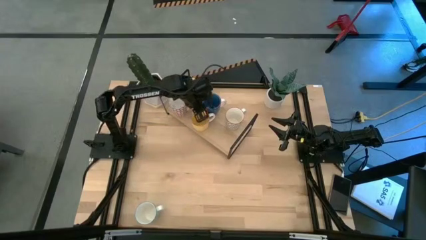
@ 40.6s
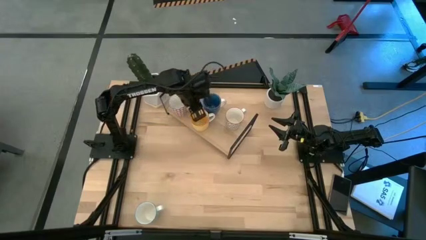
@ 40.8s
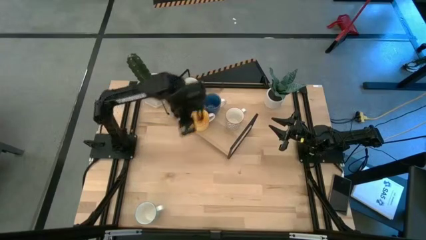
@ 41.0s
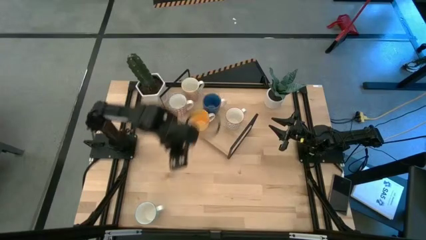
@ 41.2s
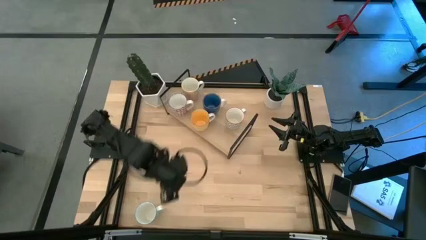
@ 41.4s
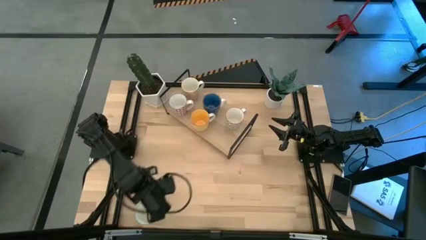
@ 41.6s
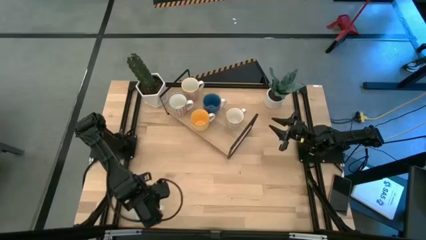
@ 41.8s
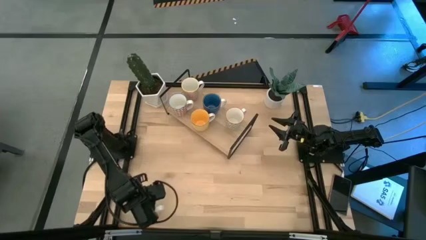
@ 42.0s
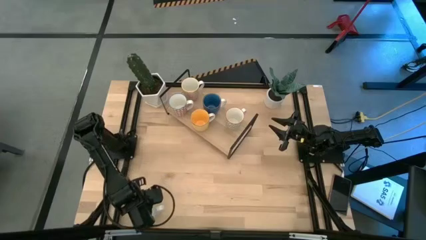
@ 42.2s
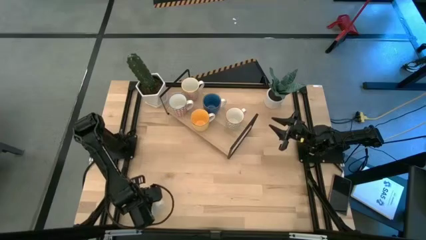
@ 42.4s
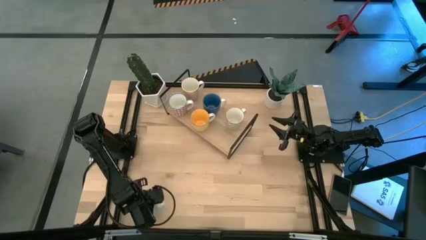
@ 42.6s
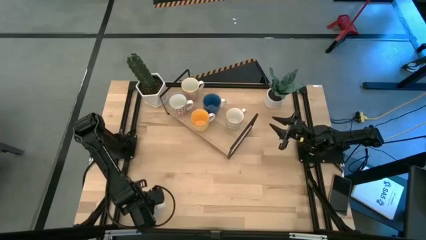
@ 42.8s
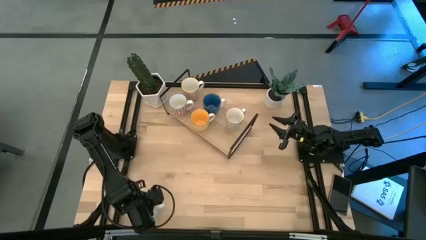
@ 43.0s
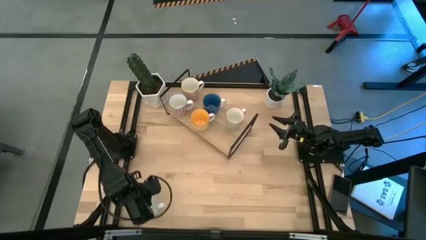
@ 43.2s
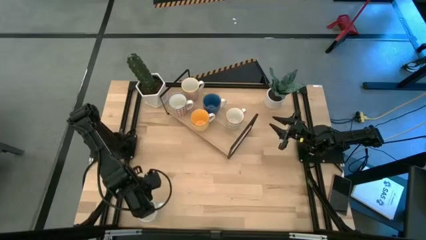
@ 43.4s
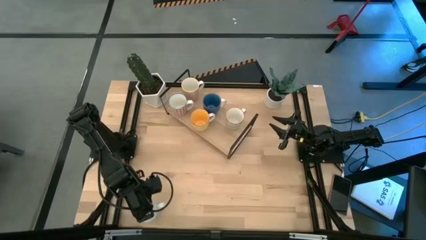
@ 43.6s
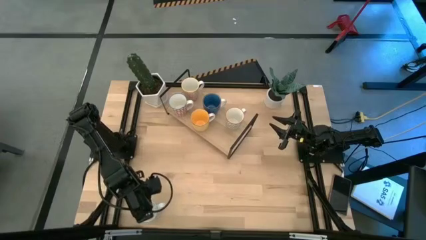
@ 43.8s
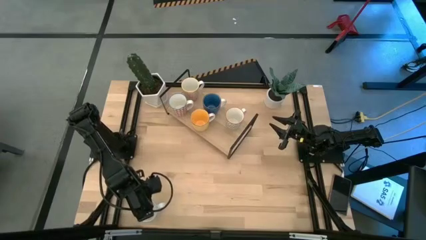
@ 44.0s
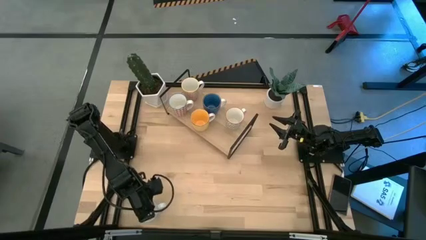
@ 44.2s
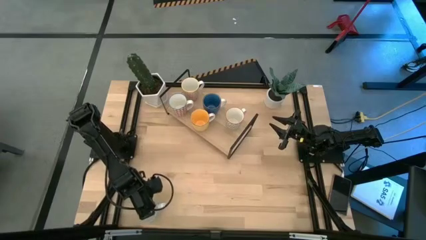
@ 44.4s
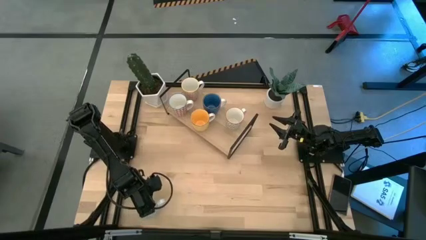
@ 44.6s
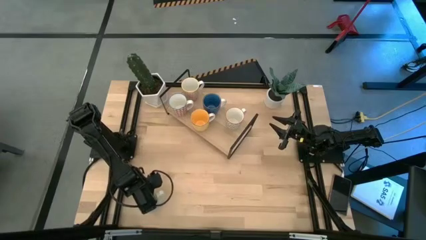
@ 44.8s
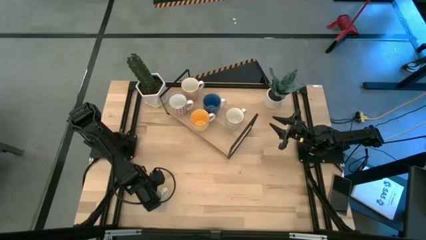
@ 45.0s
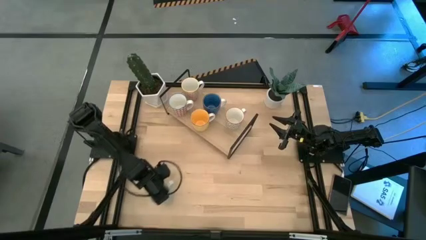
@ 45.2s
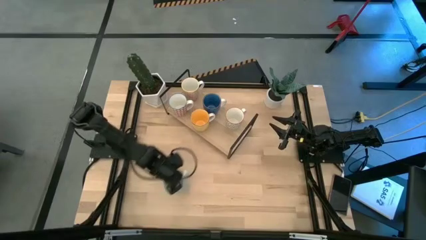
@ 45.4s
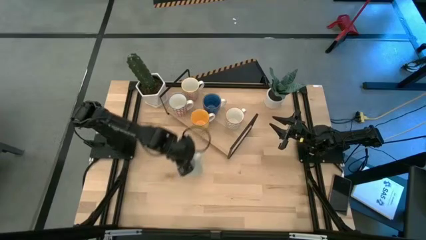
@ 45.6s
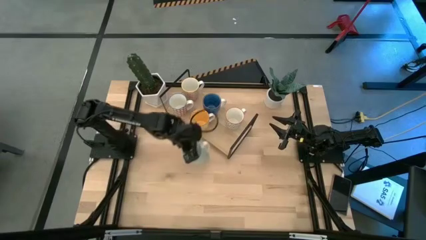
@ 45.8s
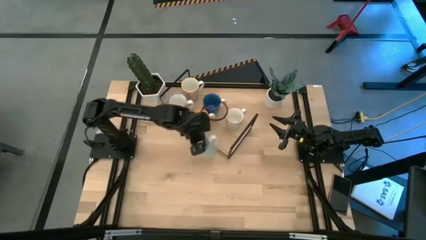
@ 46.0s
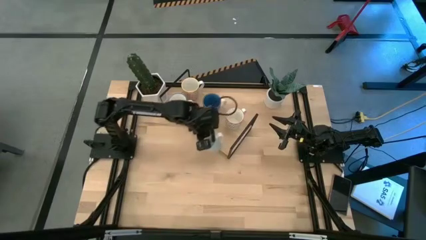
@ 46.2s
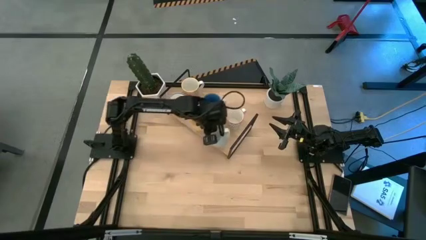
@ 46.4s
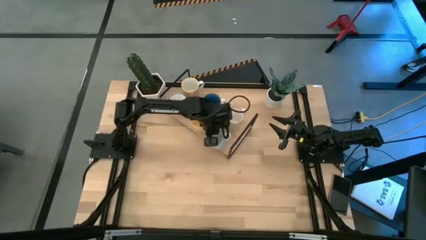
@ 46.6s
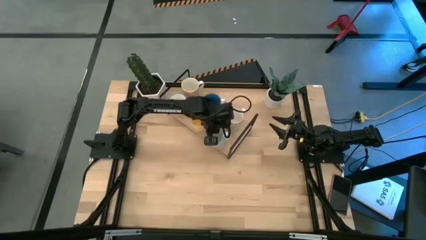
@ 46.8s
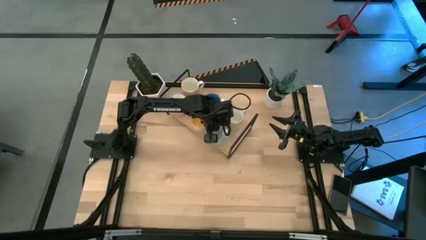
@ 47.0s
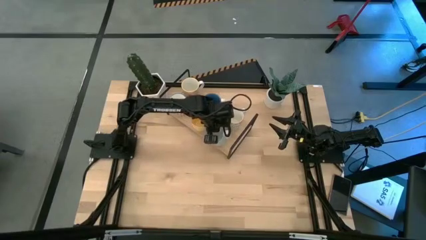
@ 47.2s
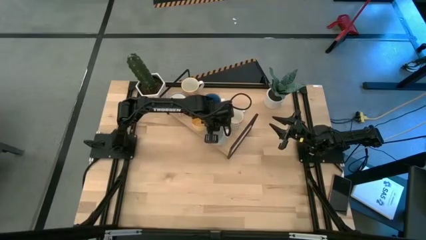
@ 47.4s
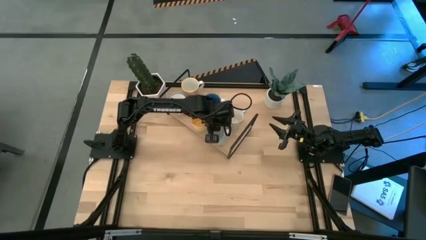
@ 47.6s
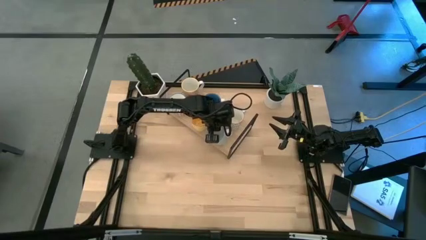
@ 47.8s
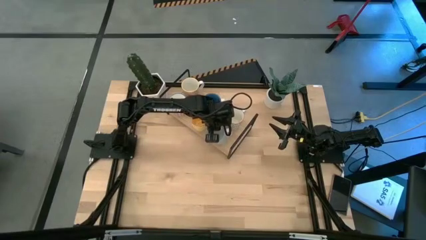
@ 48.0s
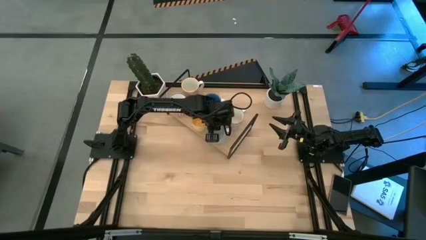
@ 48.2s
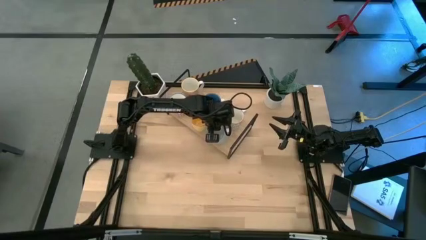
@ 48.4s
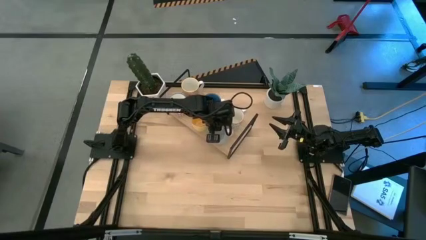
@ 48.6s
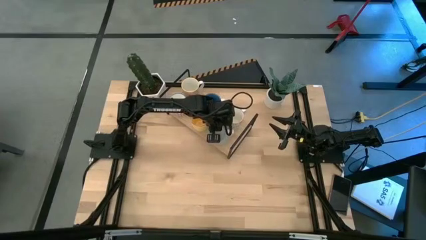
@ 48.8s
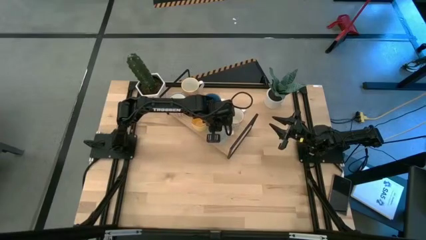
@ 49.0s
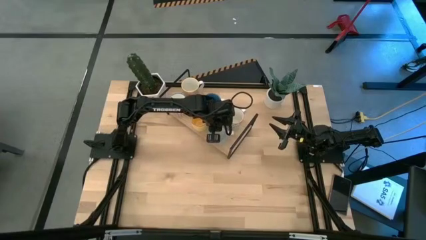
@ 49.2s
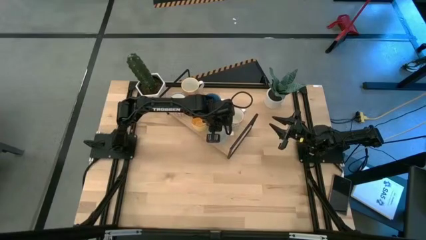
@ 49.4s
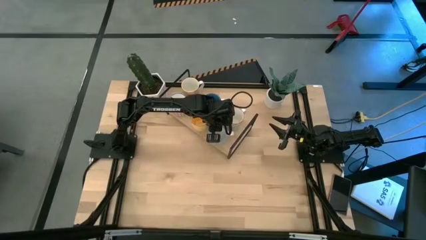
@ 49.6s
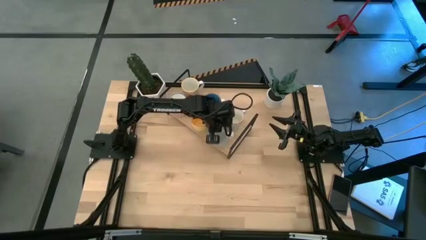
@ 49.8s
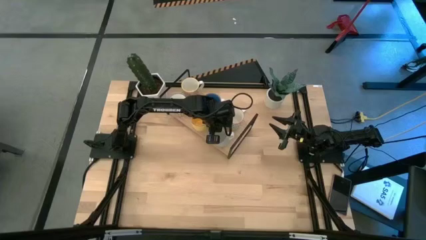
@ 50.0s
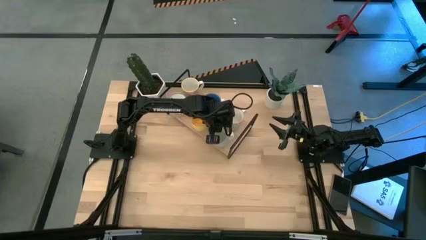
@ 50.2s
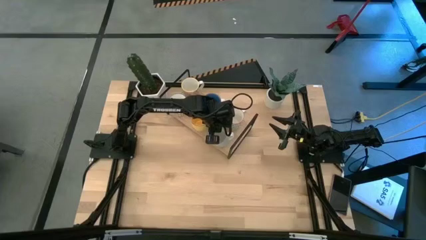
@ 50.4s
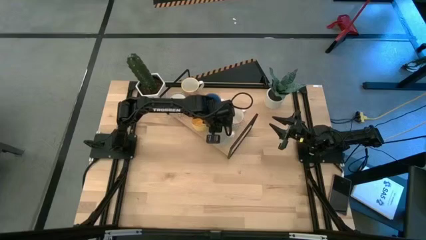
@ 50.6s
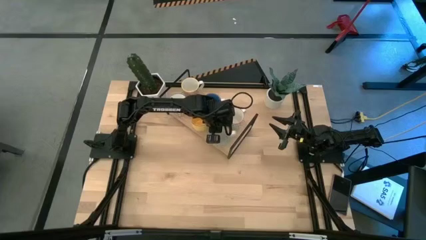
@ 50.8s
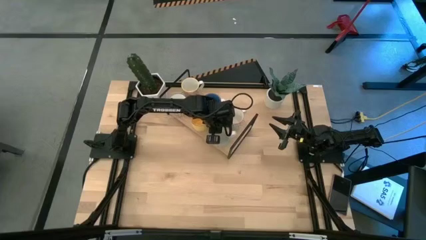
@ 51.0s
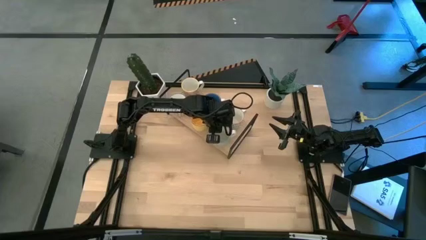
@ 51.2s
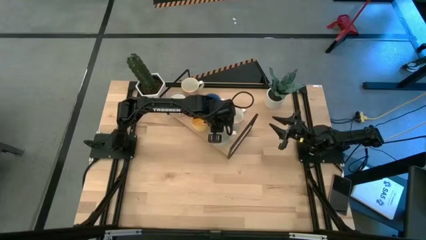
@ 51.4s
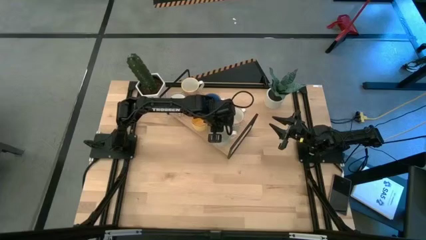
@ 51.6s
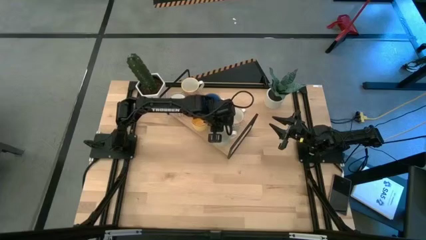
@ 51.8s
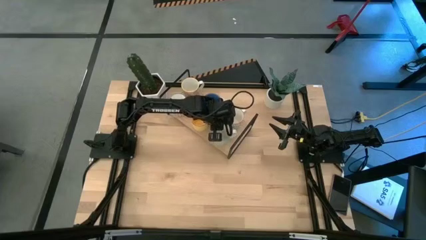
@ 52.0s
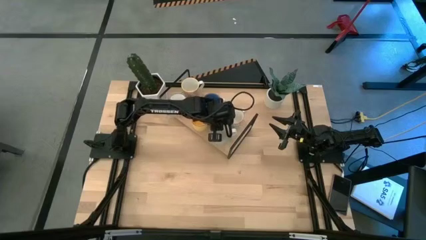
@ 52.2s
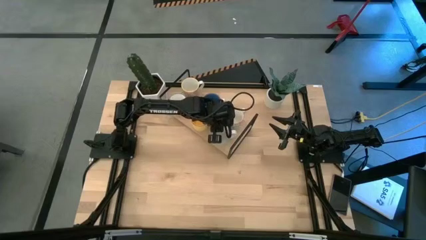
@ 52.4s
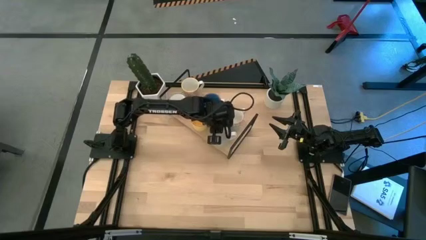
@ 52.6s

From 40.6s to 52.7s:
Task: Place coffee mugs
Put the green patterned mug on the shelf

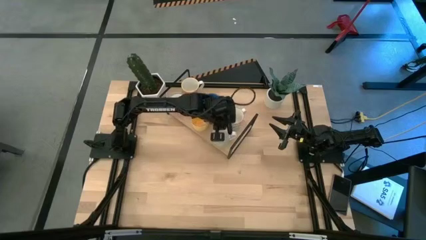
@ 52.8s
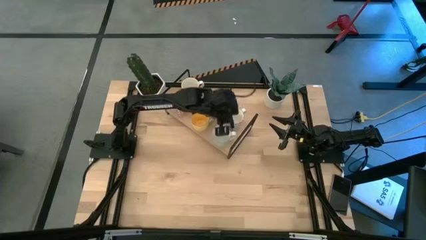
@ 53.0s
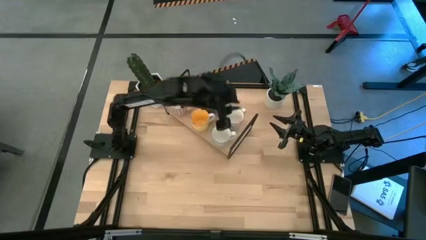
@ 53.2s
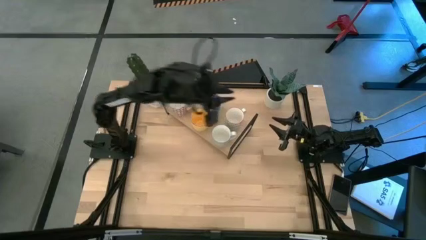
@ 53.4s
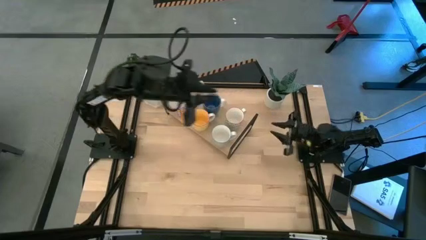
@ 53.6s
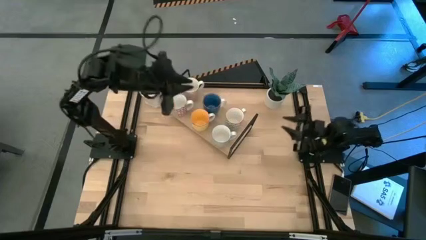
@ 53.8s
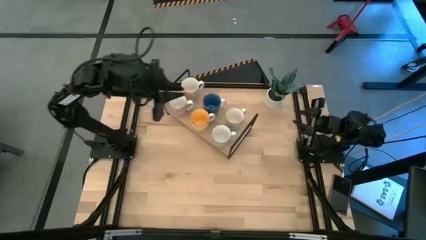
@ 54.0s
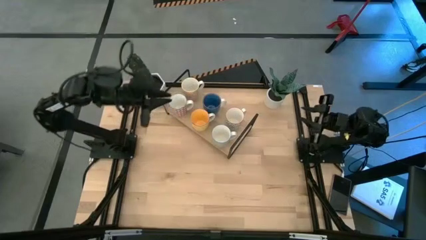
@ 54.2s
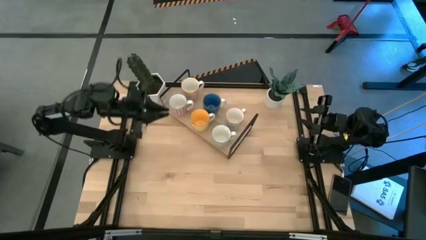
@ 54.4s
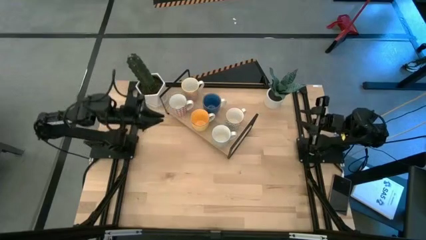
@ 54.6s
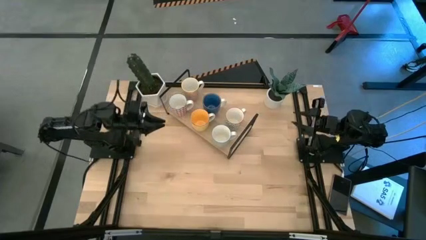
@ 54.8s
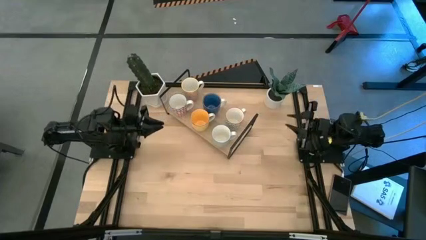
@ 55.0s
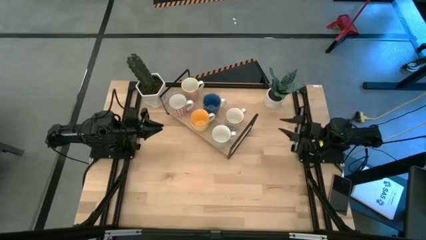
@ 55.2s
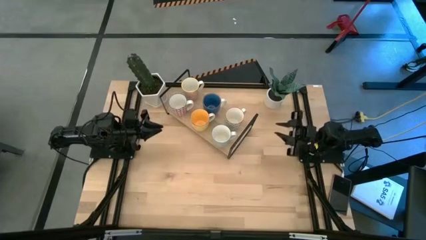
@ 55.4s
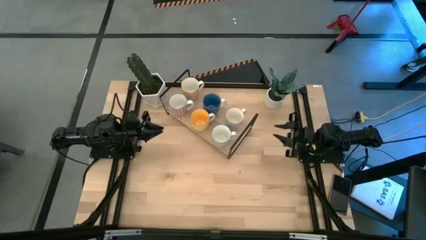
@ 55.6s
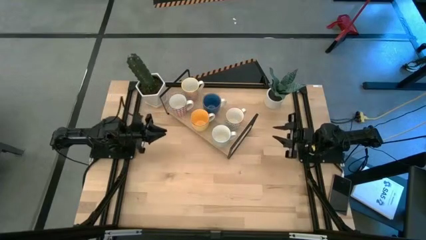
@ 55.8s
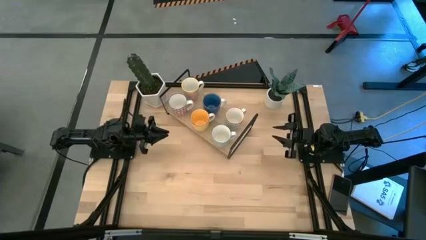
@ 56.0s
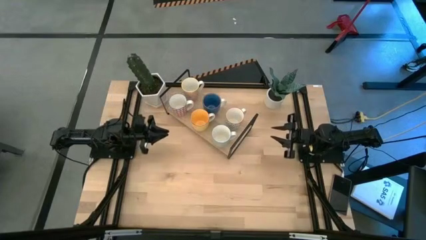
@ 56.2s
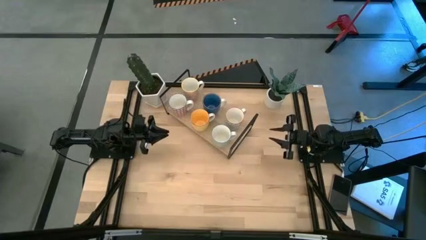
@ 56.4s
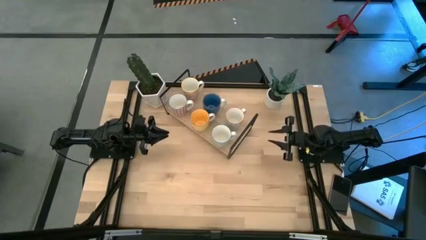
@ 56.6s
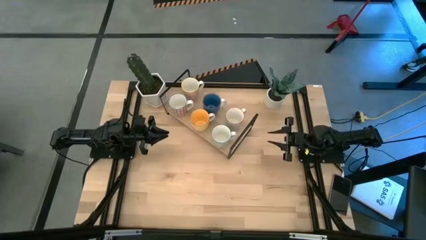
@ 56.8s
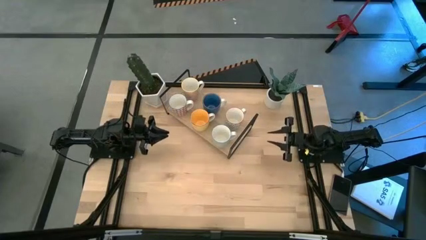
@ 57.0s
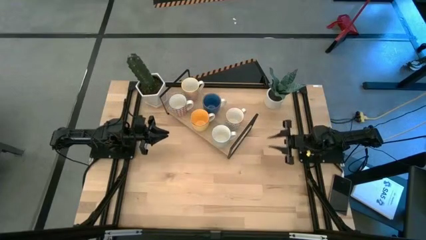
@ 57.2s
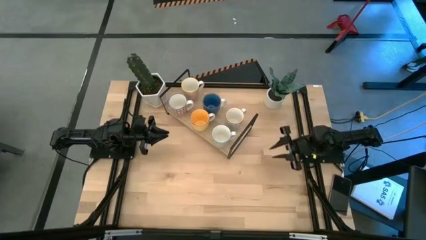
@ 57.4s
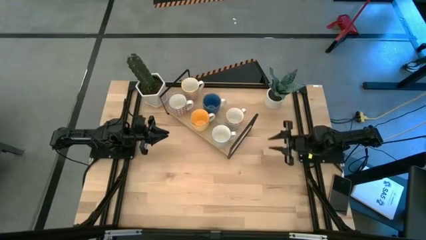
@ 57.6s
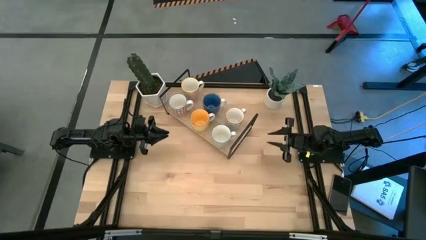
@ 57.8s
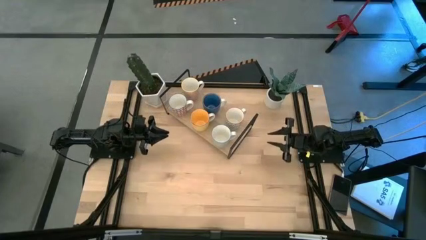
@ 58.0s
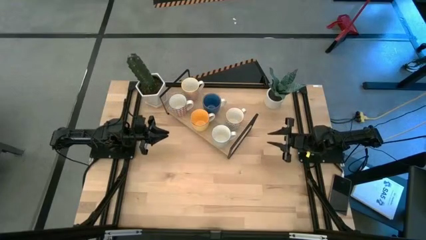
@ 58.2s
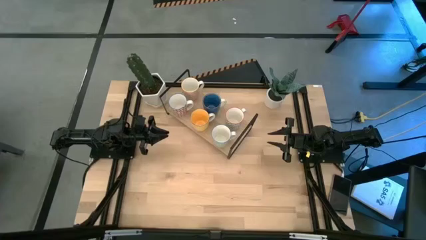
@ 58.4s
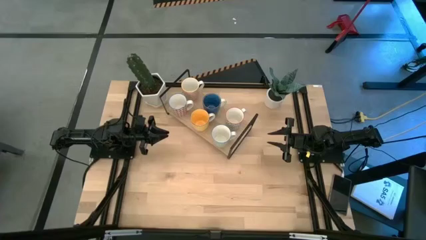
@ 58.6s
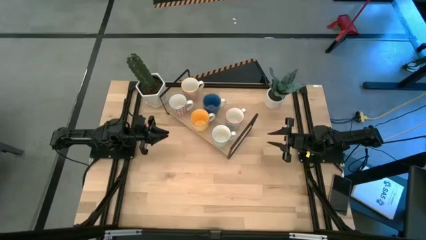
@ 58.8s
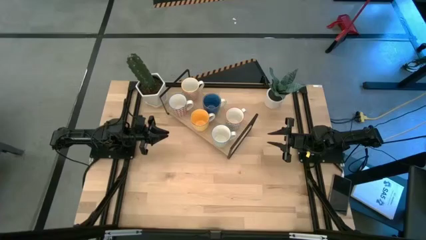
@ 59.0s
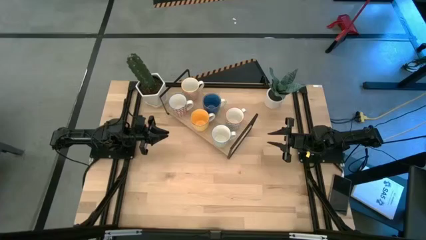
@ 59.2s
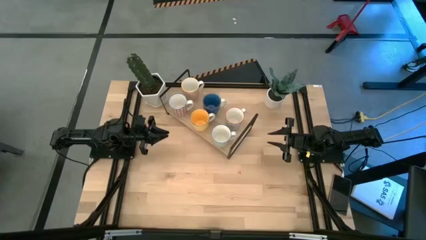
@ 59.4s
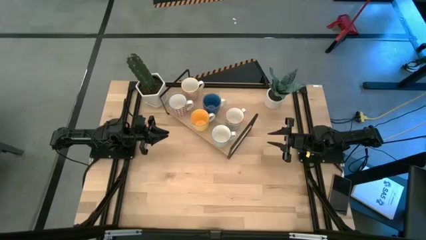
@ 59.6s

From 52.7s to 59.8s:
Return to Home Position
